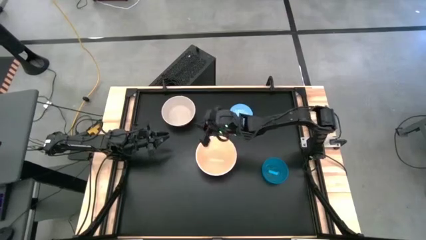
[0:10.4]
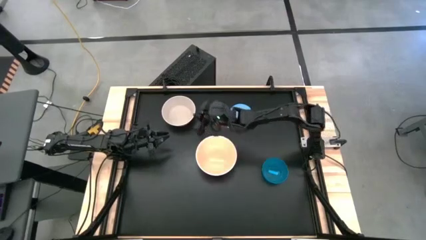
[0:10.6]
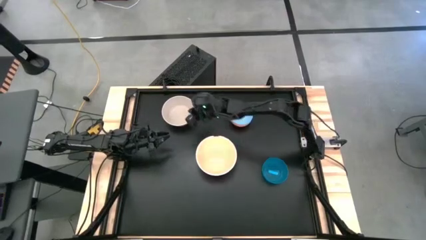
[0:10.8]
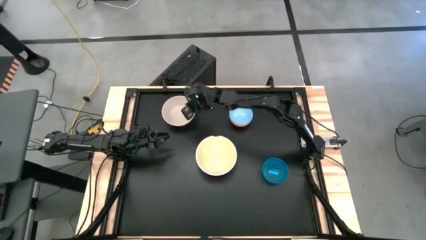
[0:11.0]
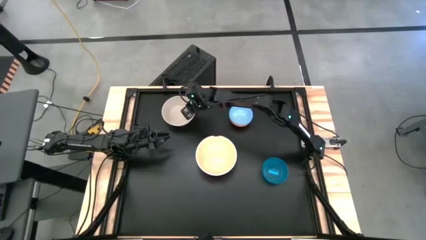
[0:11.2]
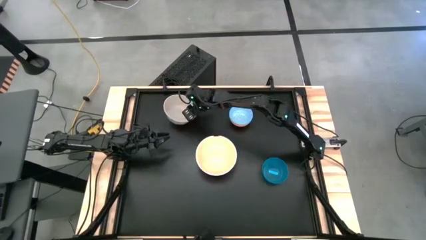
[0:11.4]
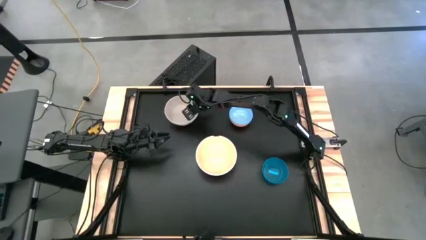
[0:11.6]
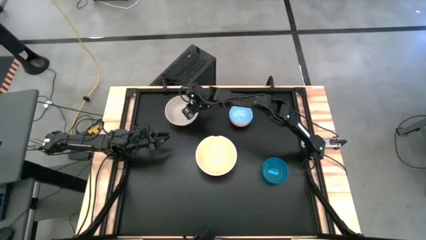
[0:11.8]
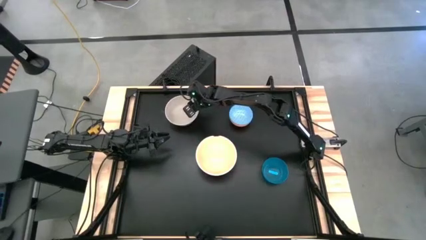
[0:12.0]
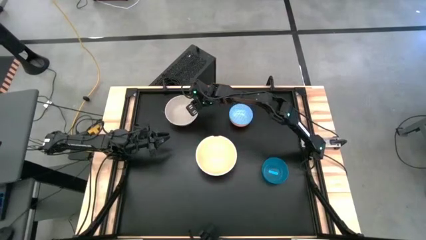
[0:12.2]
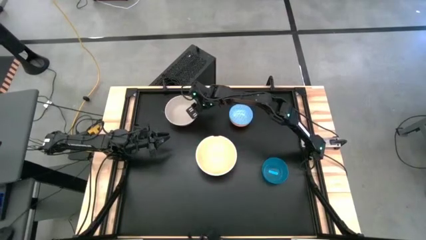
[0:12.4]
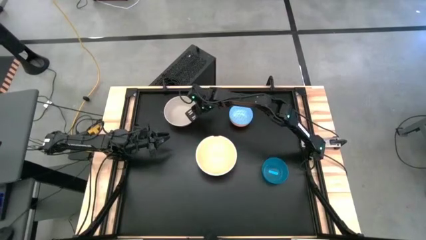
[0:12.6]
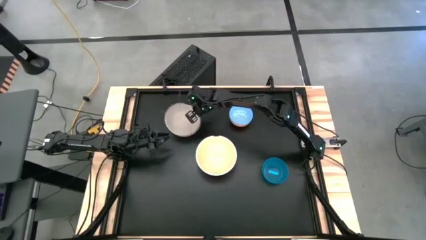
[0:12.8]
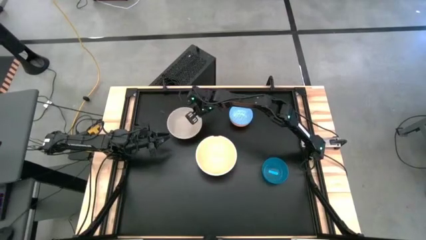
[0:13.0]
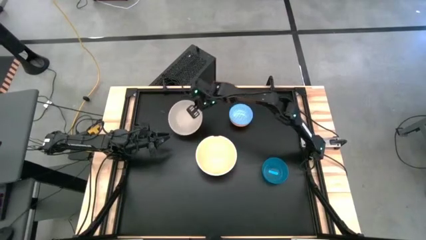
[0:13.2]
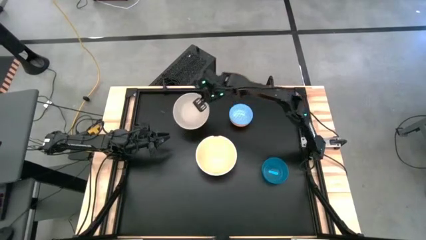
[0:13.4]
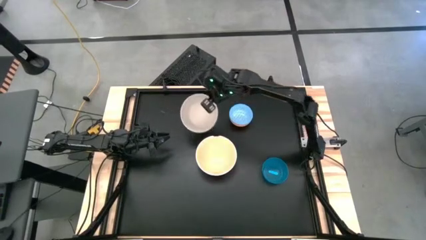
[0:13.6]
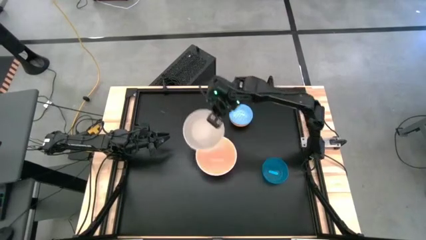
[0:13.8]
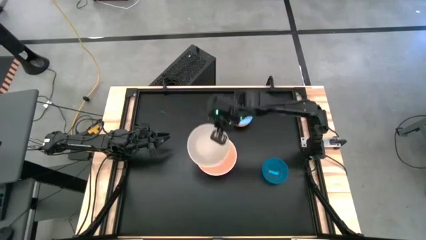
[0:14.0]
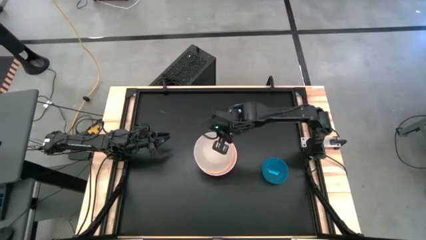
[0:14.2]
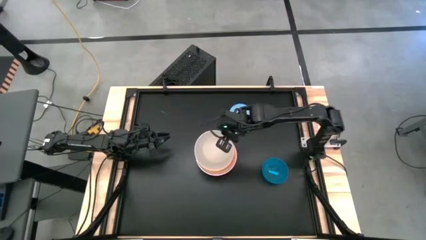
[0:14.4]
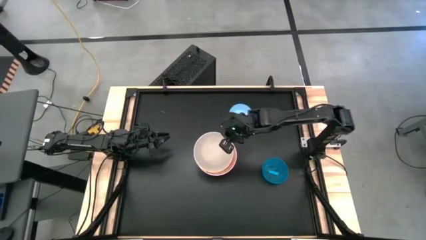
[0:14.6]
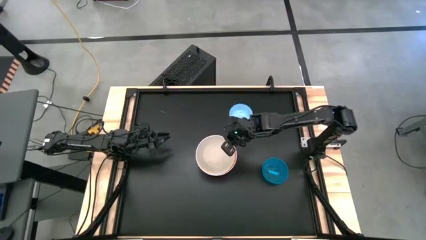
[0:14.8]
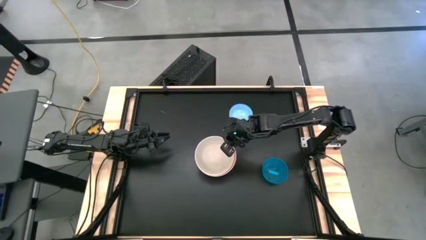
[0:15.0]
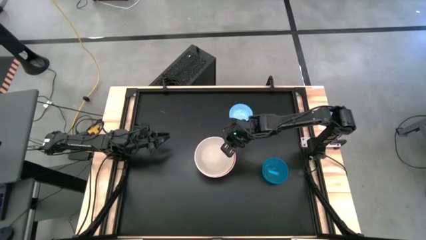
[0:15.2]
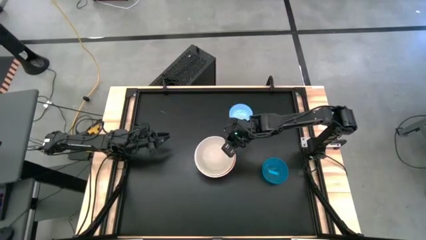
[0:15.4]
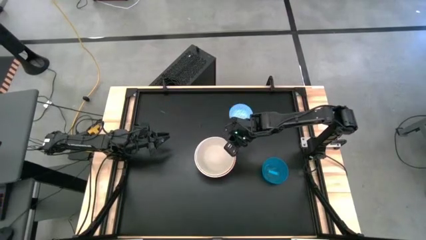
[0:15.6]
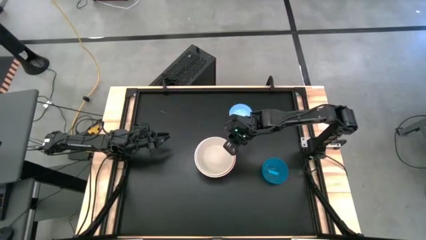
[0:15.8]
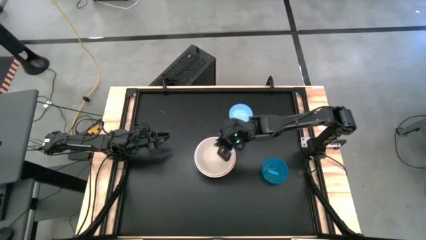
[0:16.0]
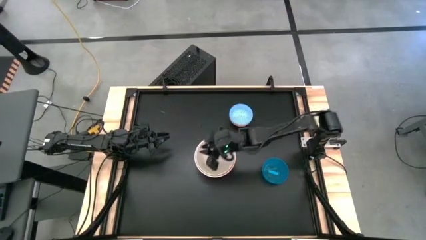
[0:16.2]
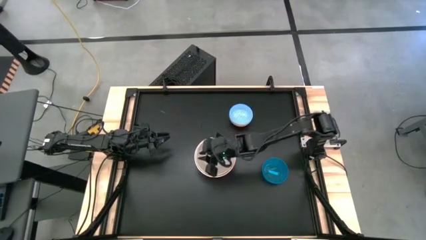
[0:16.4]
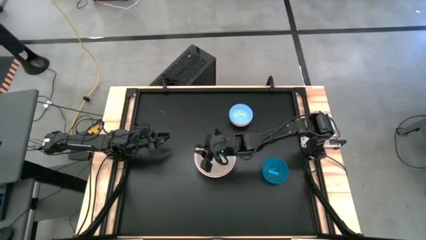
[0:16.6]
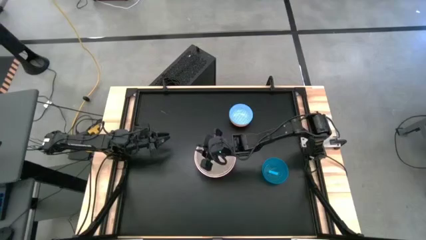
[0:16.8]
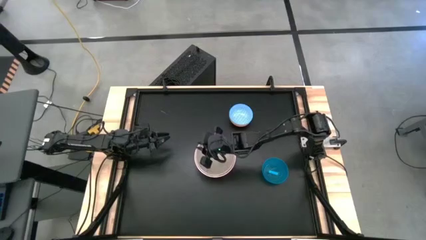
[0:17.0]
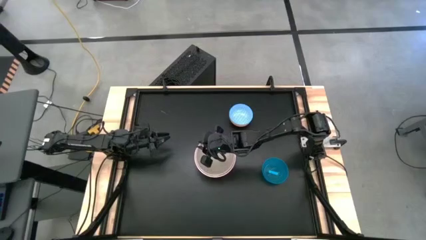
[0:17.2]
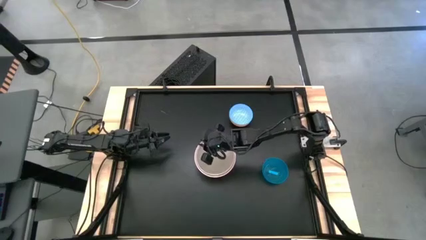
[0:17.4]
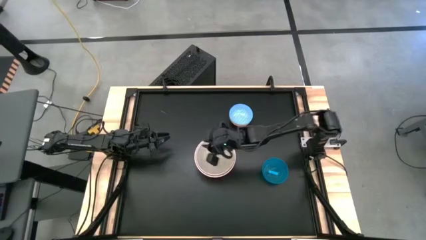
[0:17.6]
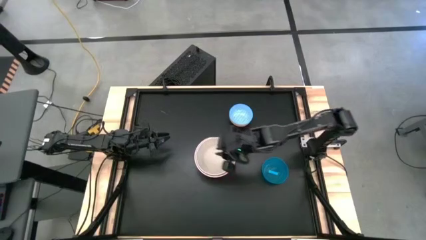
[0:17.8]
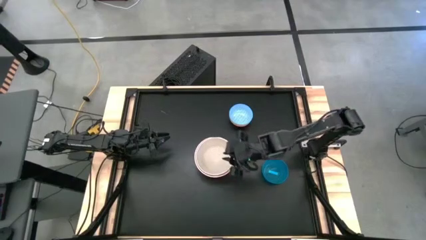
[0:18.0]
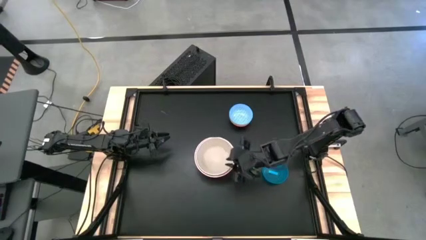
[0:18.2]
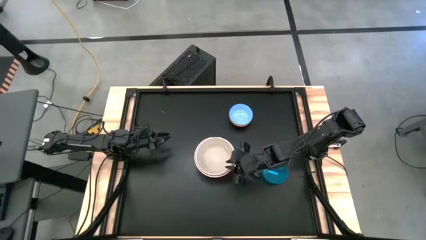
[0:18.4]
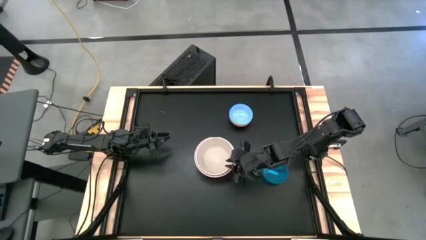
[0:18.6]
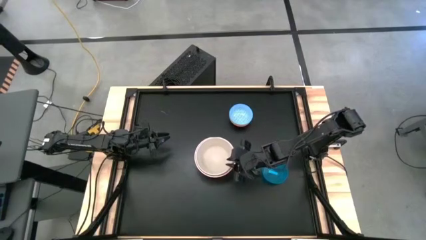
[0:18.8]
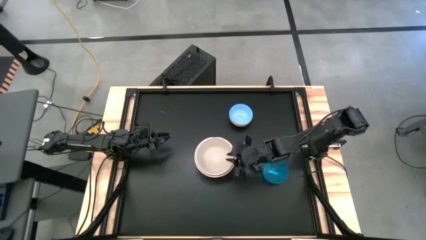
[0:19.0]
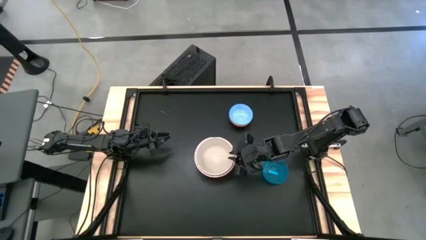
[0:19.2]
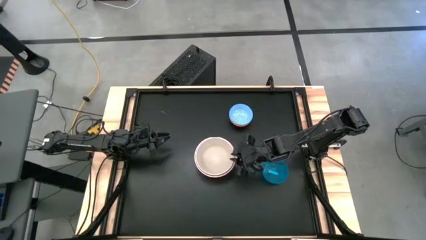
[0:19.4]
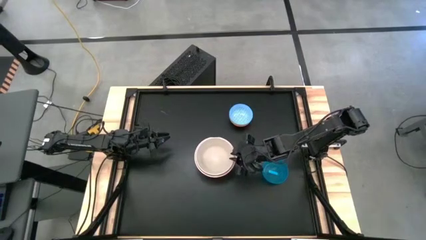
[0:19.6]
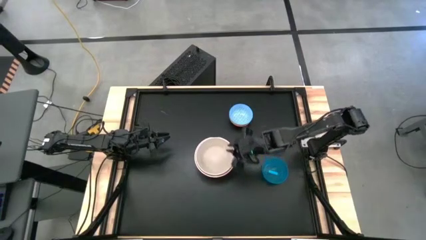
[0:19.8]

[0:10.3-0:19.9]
Stack the white bowl on top of the light orange bowl

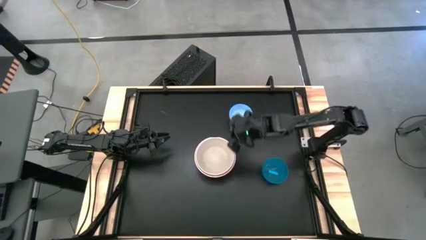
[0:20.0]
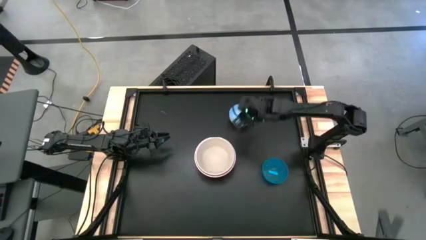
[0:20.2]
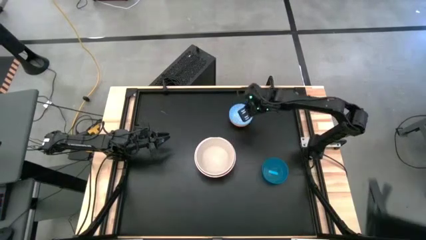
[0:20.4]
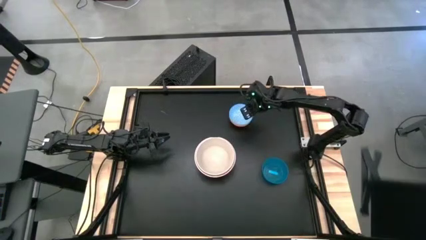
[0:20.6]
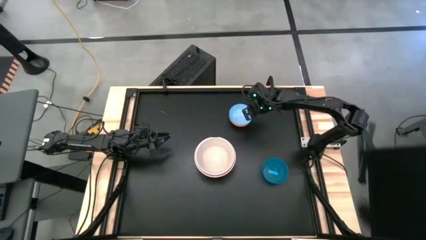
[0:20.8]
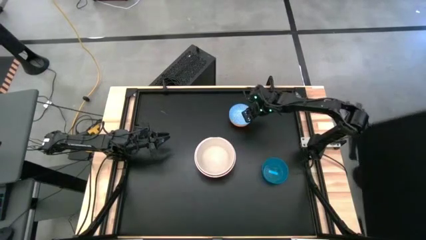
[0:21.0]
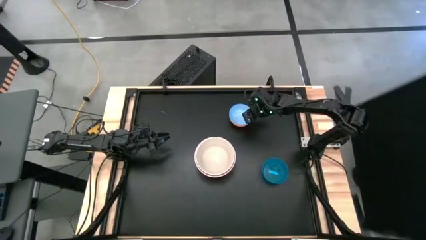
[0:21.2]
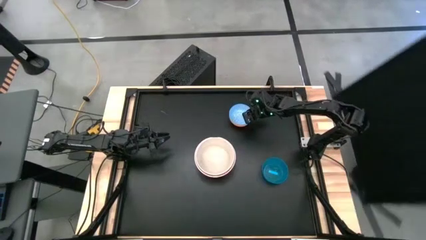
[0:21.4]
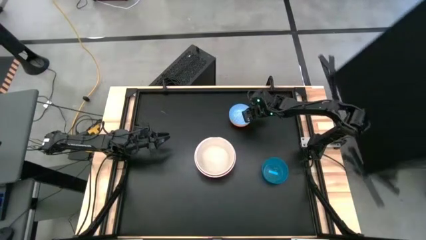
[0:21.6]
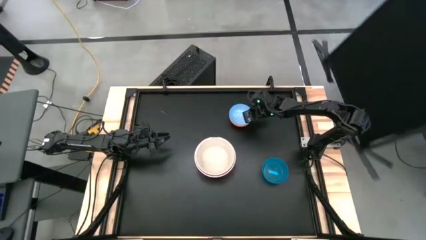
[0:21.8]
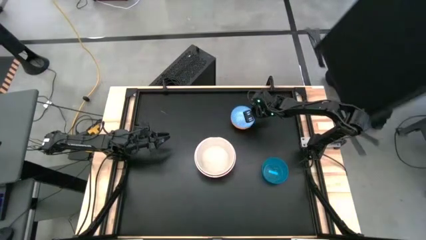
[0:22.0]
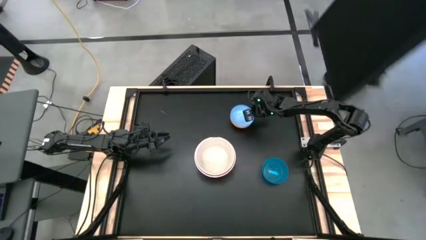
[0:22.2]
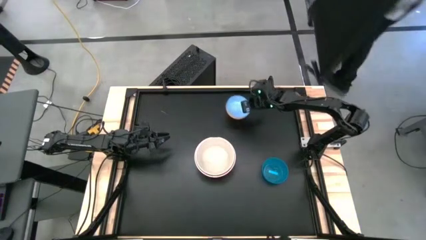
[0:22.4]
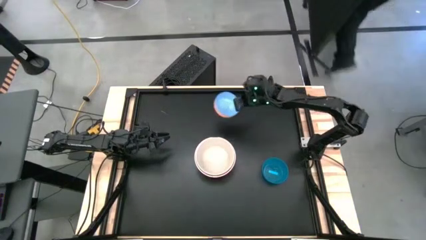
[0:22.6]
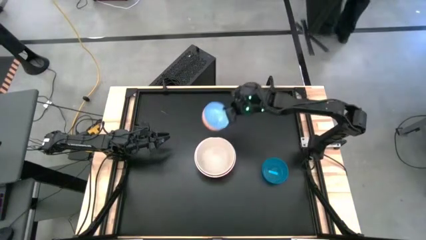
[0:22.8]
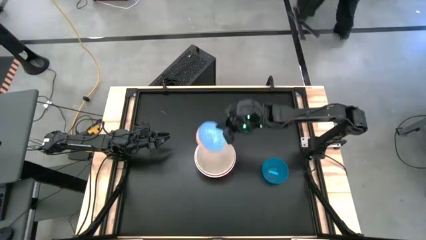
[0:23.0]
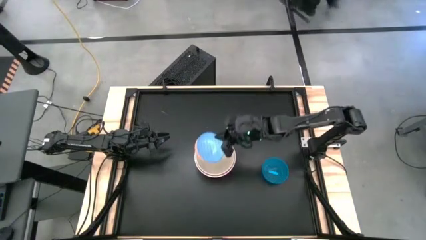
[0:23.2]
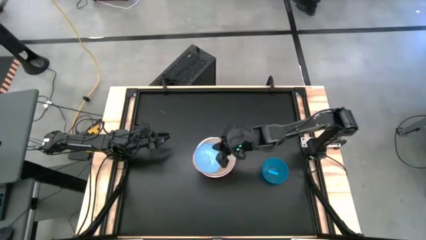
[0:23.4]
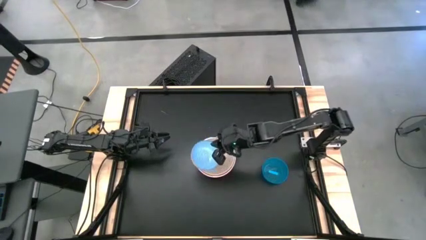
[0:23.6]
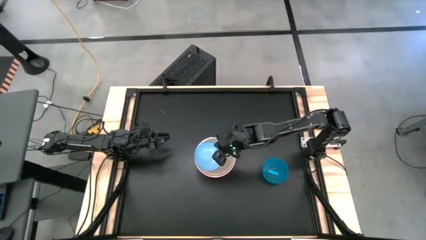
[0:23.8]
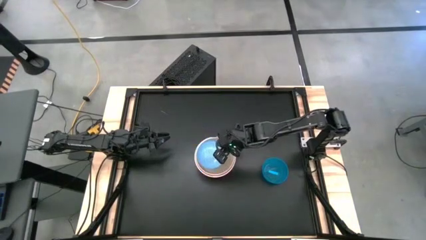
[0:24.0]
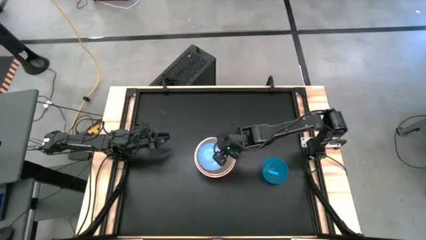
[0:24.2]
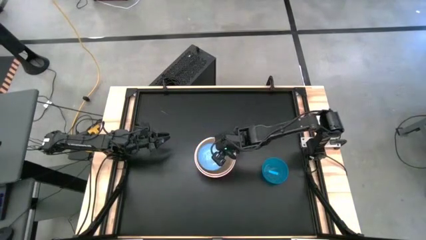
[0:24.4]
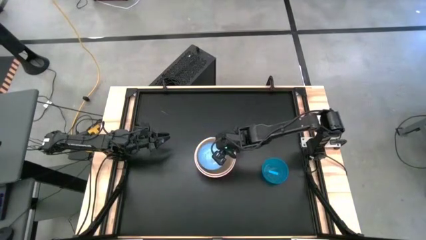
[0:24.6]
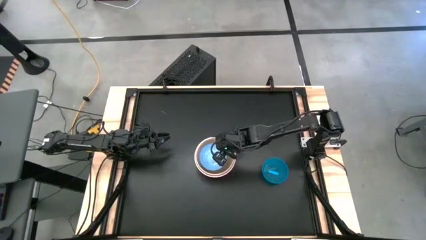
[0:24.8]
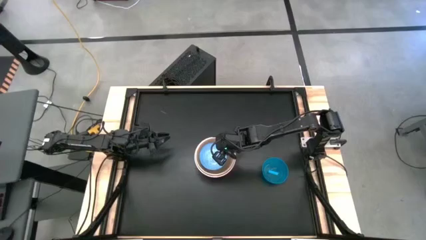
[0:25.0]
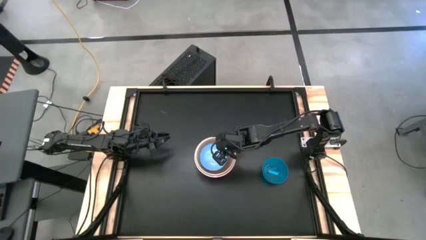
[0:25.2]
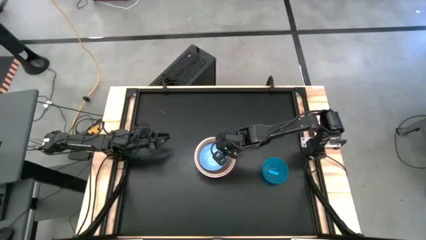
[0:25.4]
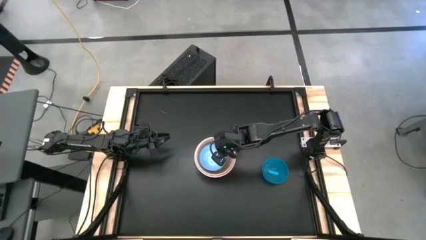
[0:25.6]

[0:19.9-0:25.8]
Stack the blue bowl on top of the white bowl
